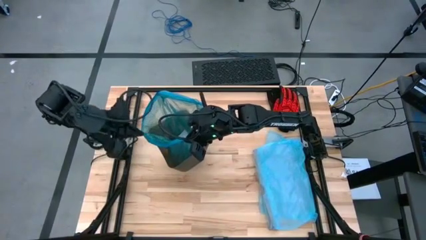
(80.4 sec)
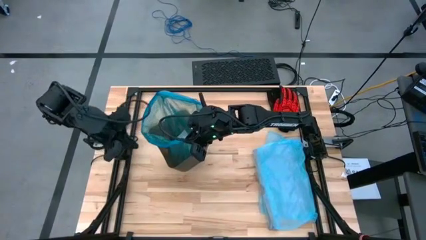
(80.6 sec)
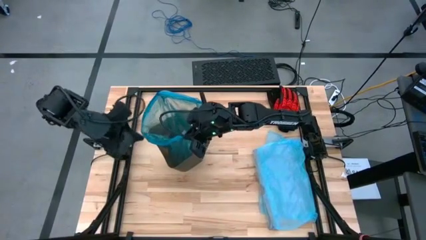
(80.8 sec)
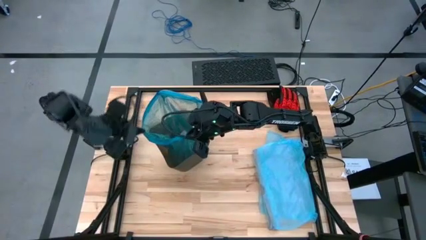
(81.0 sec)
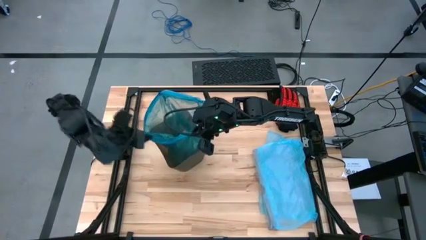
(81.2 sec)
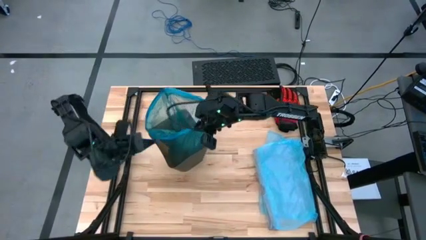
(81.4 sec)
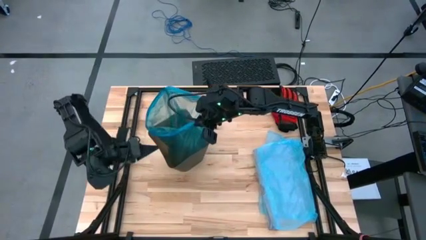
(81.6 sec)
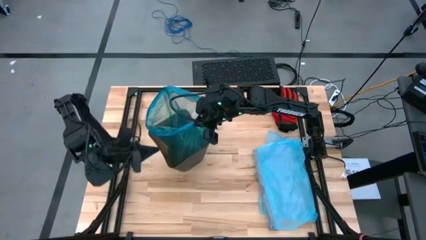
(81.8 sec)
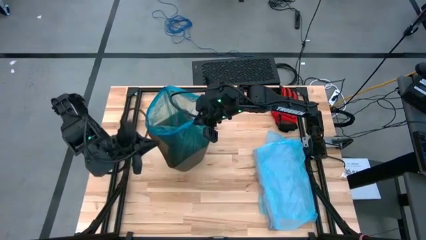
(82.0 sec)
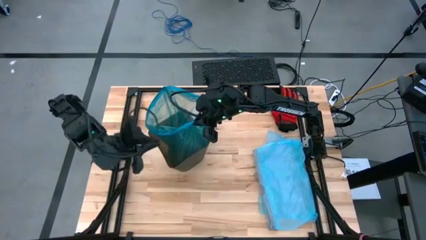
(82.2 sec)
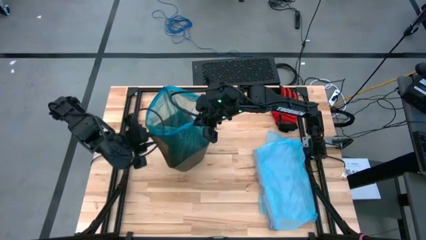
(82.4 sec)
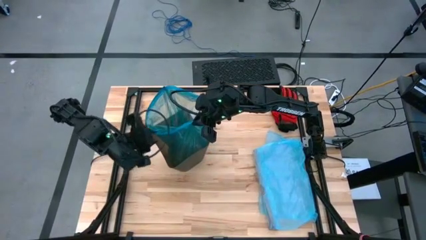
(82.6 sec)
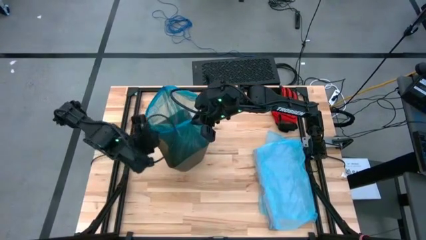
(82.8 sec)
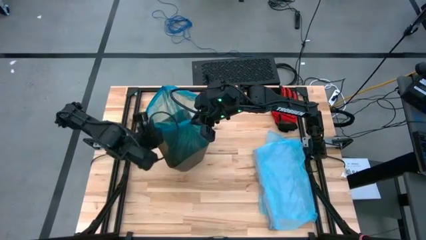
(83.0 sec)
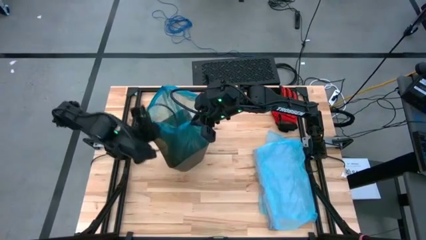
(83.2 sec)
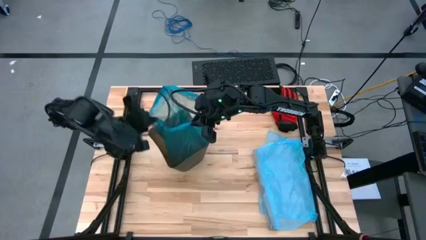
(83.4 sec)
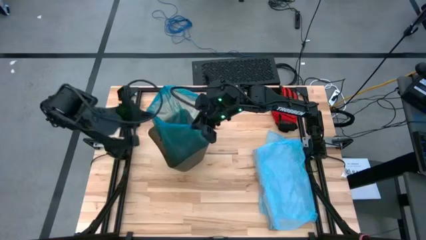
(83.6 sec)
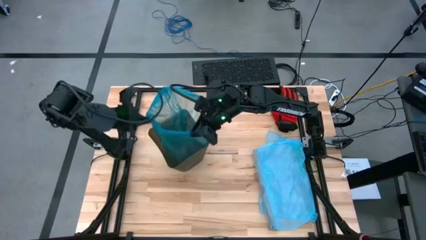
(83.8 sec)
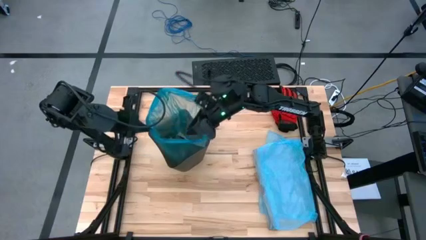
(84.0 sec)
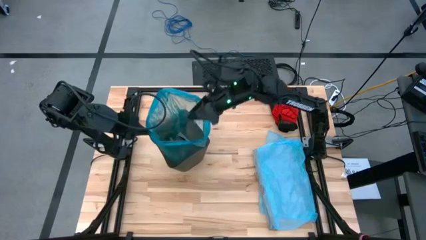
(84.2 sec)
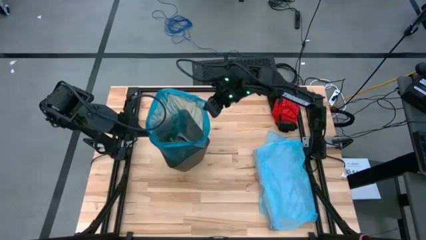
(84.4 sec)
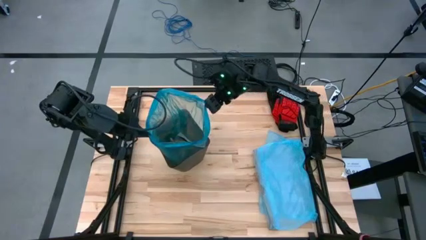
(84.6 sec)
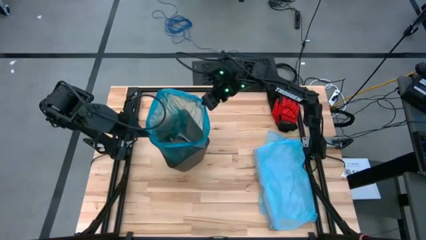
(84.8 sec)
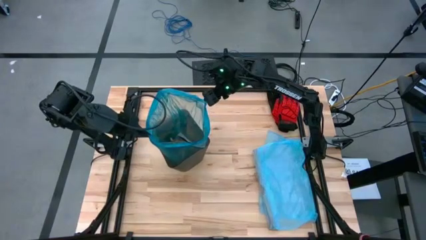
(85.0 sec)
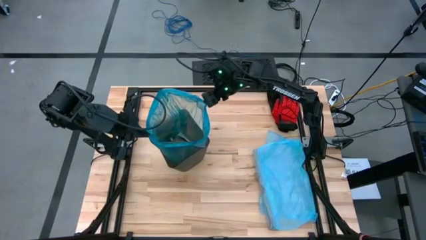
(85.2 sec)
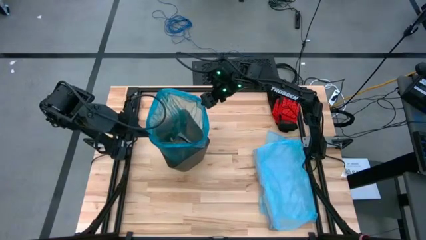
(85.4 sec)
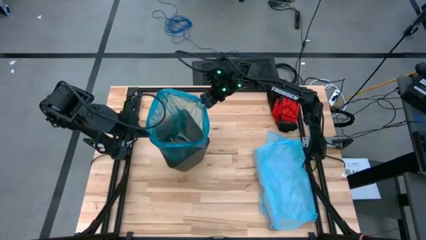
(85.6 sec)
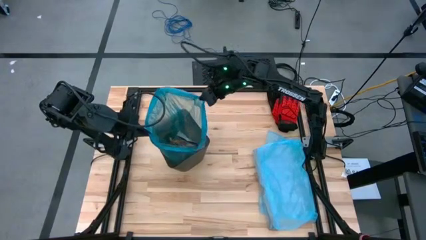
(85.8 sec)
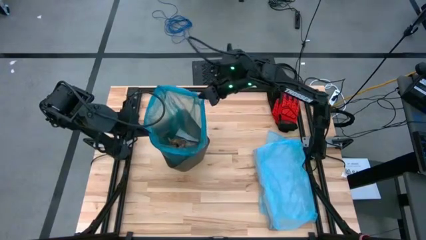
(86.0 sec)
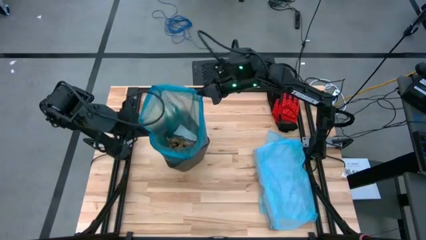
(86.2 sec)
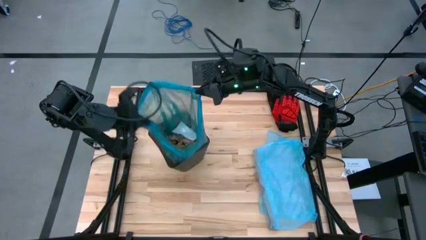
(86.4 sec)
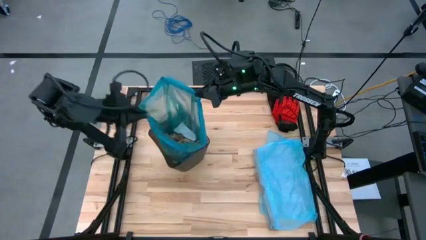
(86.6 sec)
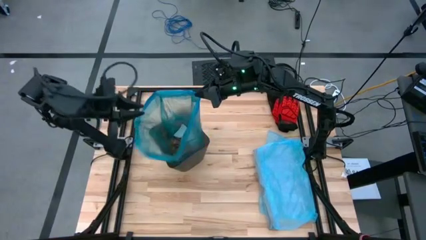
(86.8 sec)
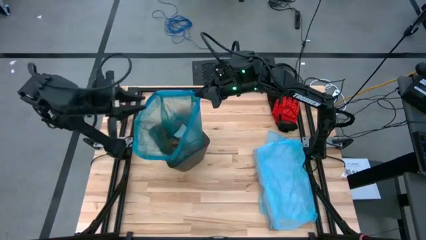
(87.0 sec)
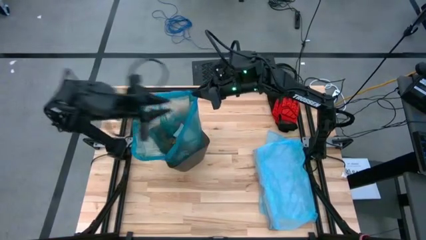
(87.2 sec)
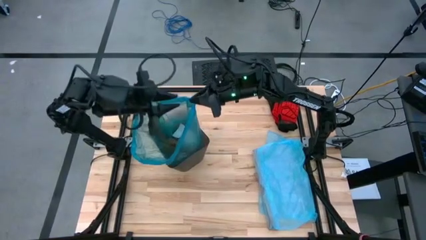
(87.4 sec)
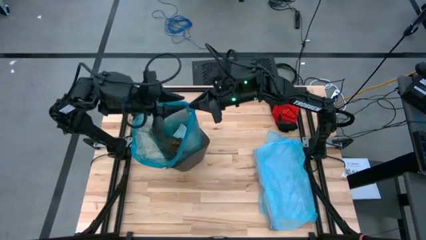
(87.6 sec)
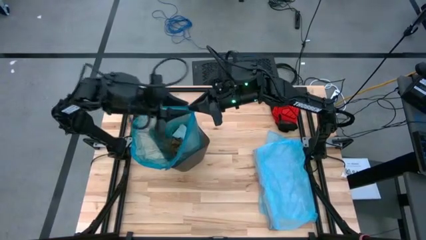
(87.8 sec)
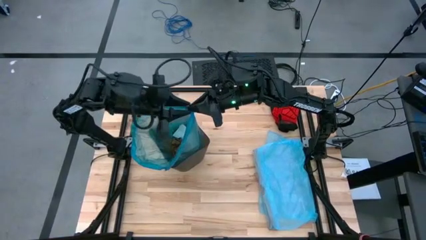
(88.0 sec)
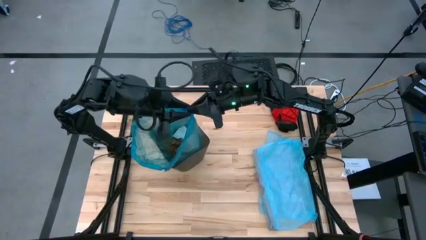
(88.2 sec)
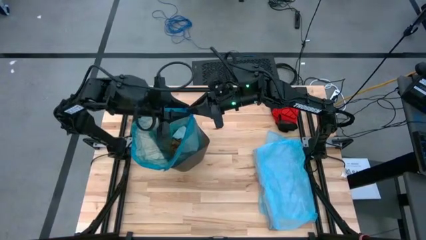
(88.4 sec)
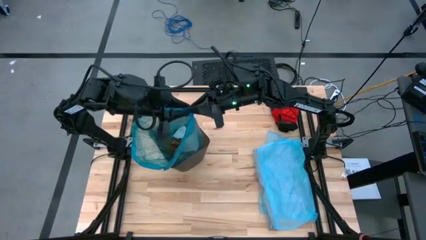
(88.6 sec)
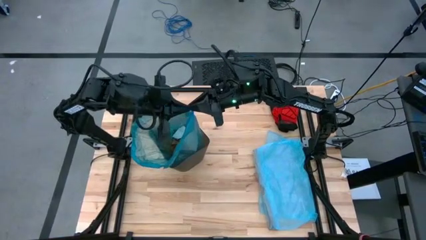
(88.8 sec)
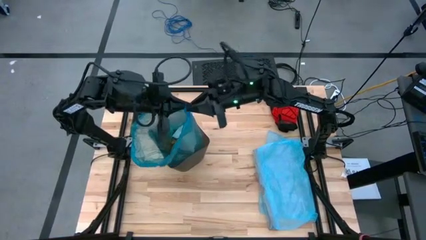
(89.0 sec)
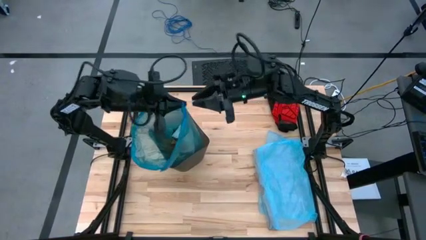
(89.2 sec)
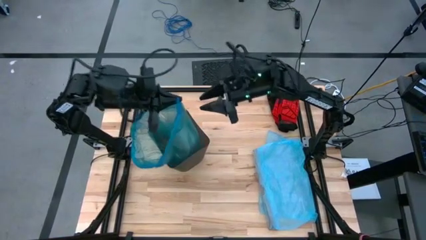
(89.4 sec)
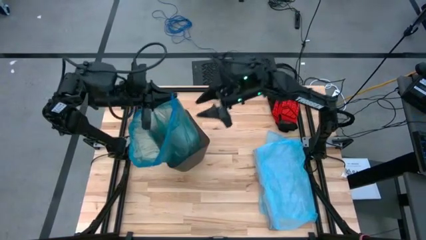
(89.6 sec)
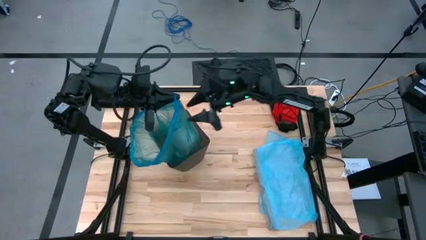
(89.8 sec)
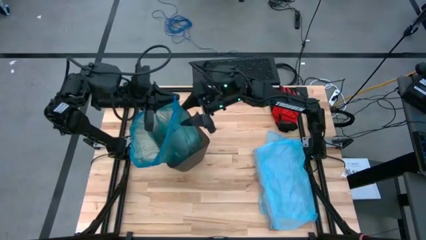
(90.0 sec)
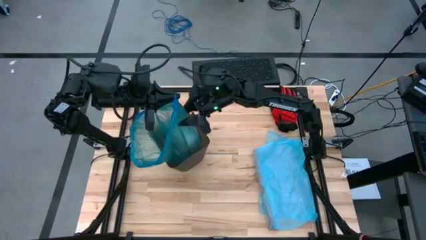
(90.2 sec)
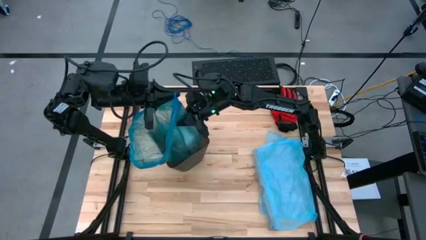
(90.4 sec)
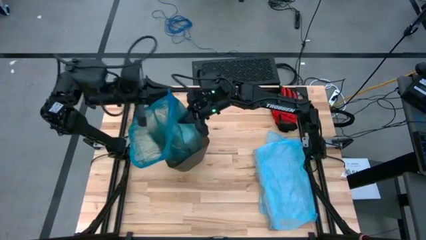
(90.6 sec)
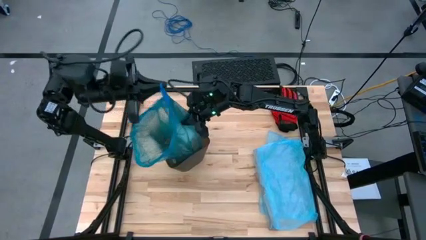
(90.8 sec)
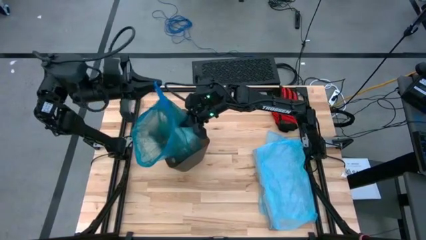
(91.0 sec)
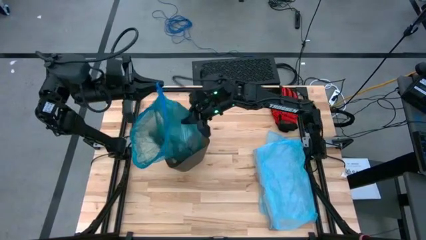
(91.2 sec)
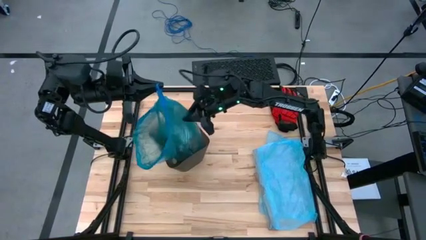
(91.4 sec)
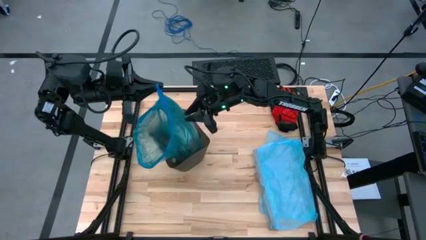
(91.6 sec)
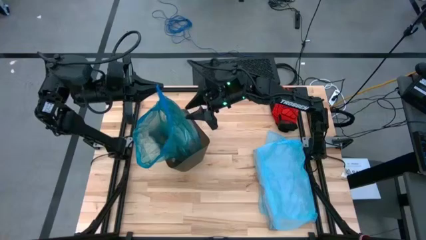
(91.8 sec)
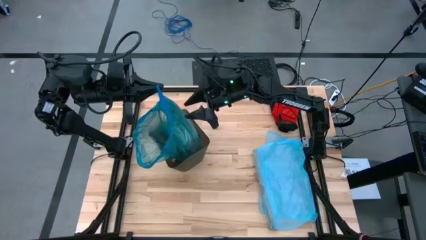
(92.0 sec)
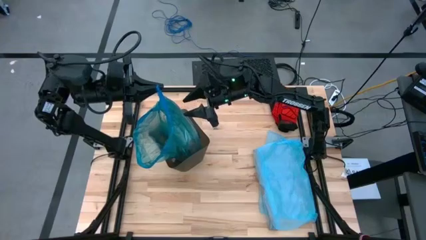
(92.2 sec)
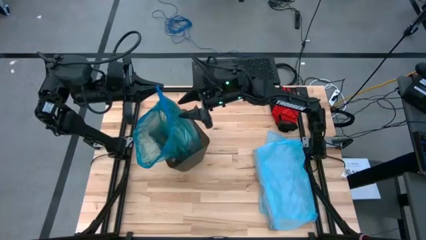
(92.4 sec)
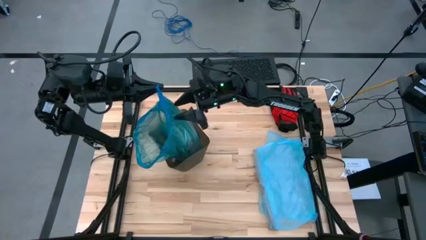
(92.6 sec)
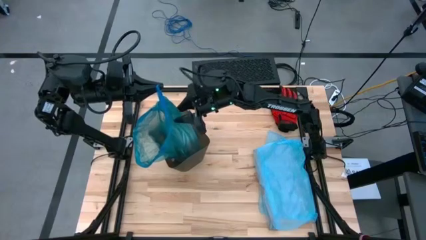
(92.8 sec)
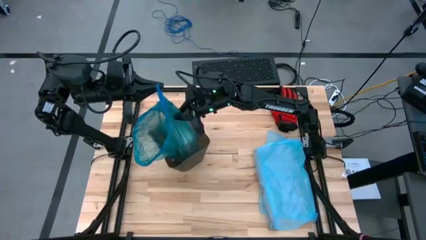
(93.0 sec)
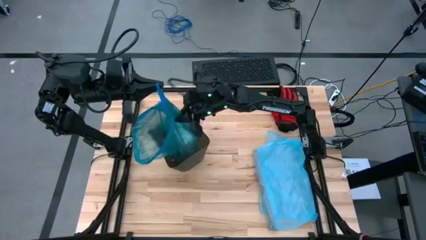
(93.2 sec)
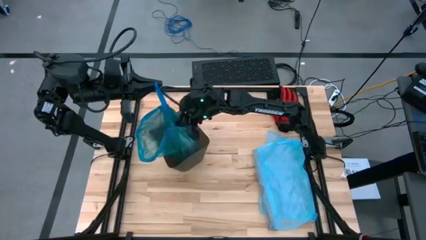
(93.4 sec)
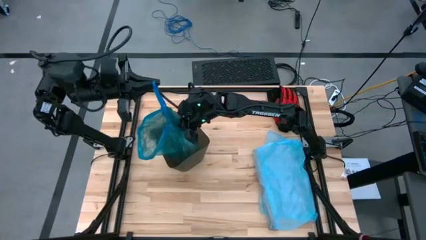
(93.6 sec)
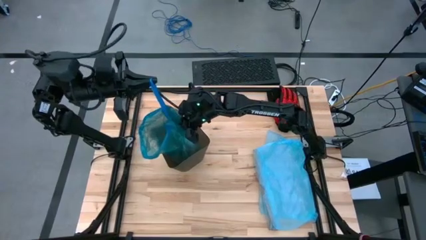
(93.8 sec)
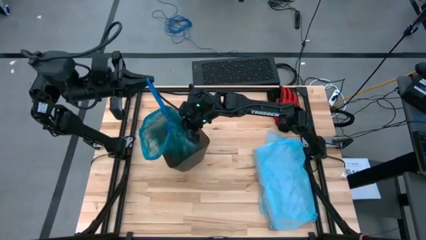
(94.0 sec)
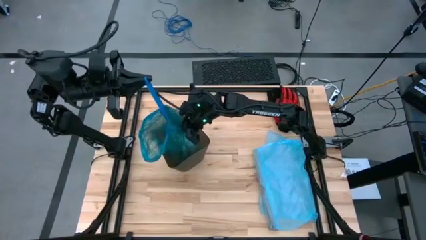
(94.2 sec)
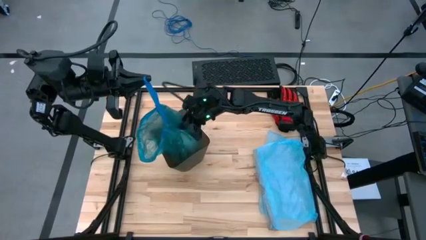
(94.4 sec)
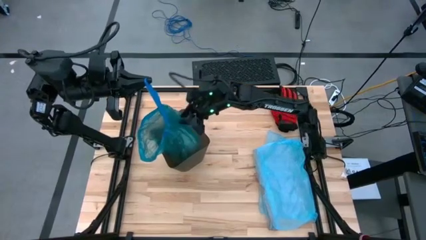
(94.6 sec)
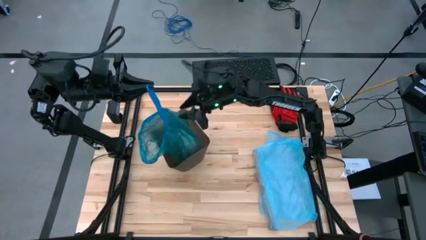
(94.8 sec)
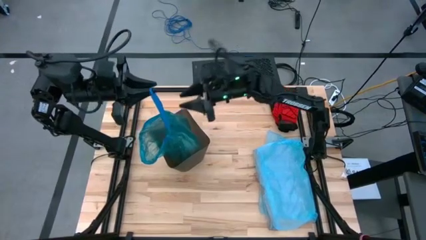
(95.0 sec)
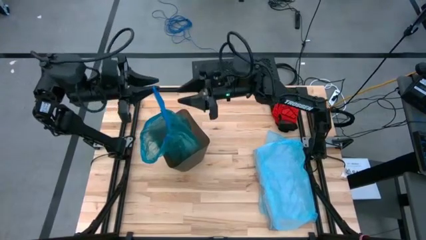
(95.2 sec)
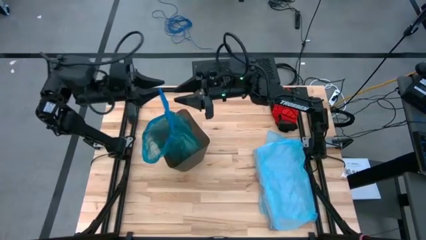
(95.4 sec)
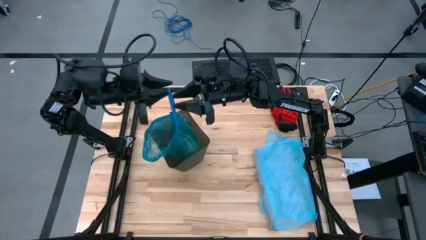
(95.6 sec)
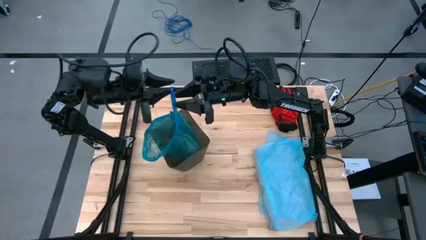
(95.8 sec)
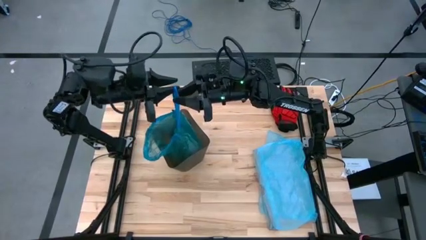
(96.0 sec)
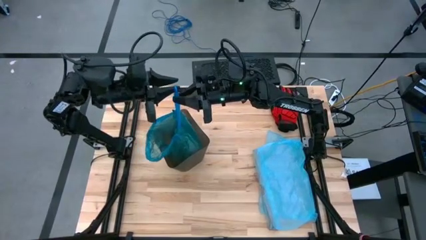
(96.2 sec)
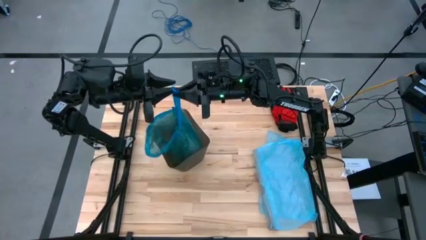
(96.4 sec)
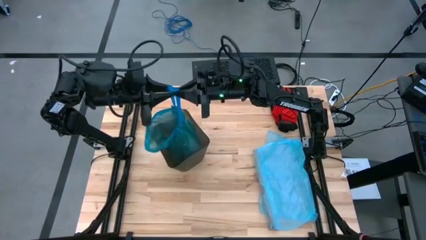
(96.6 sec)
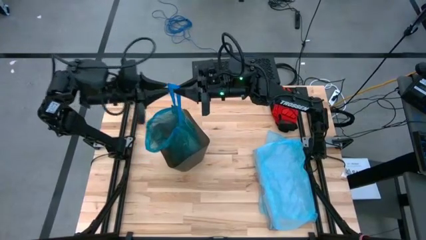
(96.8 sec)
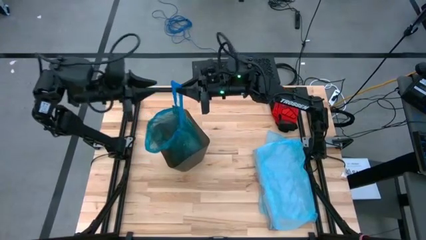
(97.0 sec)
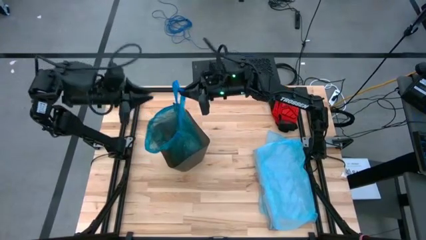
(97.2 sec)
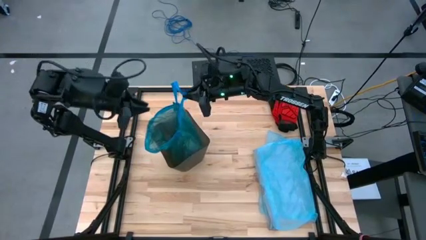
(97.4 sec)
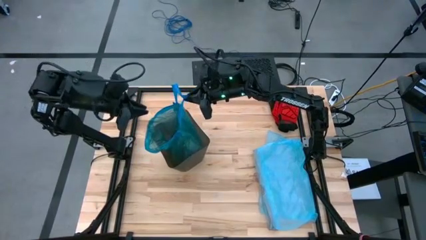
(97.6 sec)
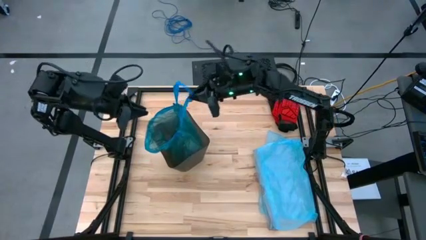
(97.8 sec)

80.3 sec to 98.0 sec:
Task: place trash/remove bag and relplace
Close the blue trash bag in the trash bin
